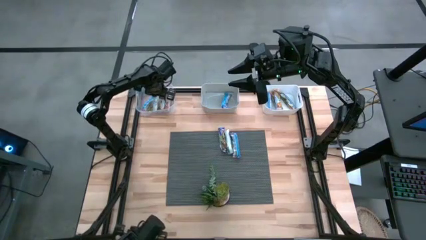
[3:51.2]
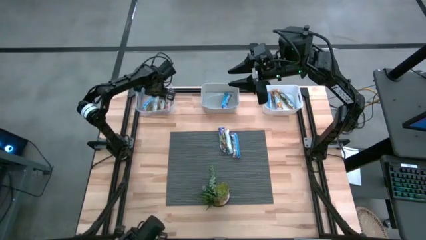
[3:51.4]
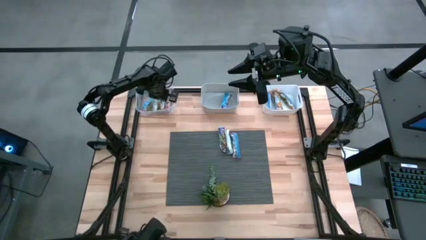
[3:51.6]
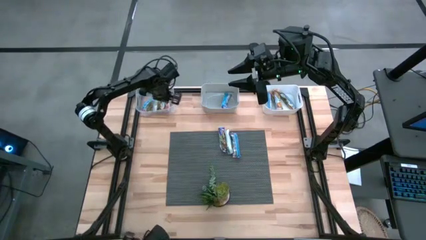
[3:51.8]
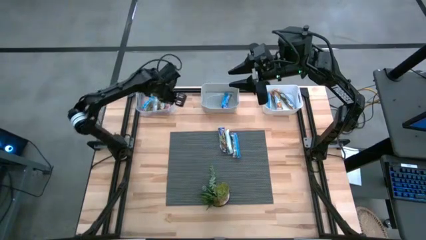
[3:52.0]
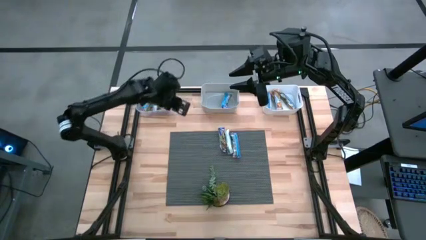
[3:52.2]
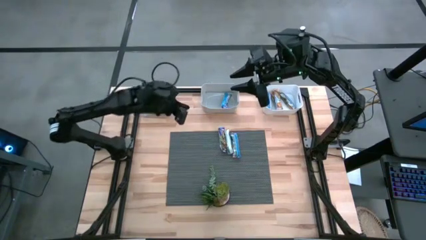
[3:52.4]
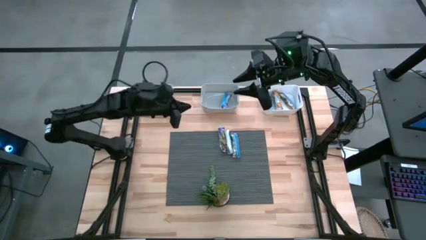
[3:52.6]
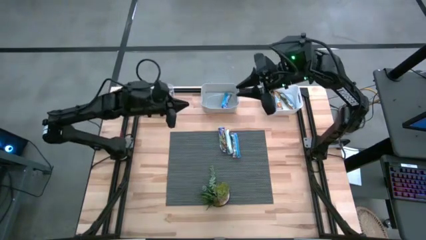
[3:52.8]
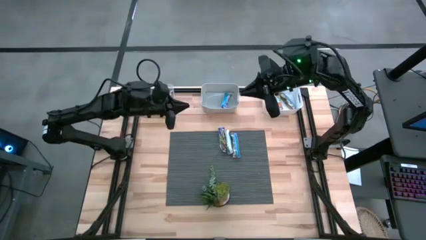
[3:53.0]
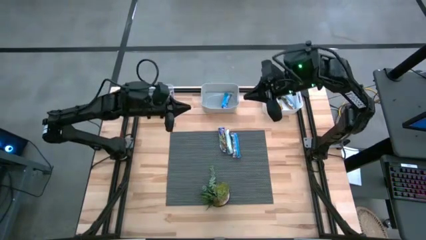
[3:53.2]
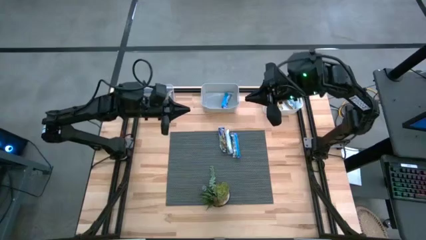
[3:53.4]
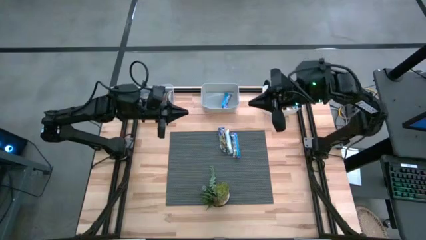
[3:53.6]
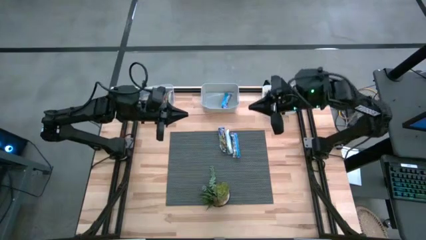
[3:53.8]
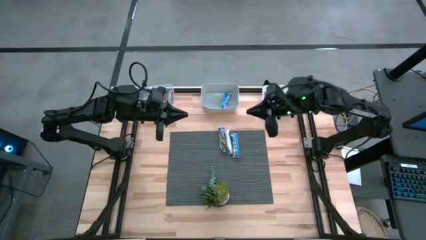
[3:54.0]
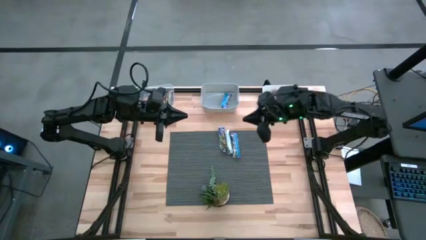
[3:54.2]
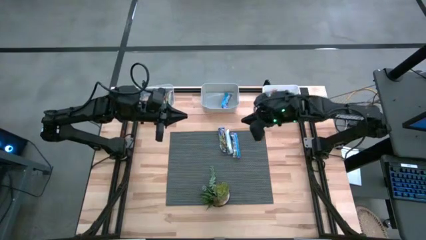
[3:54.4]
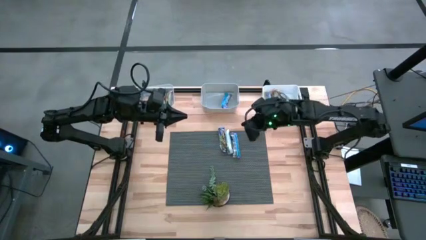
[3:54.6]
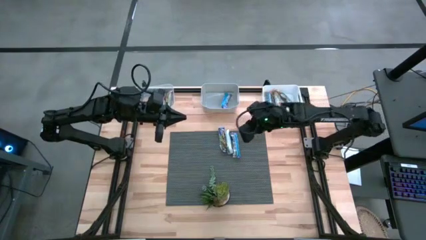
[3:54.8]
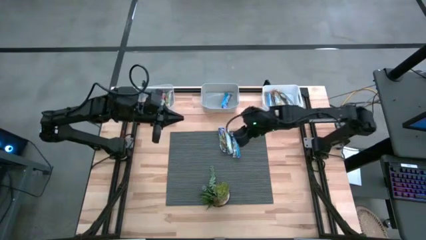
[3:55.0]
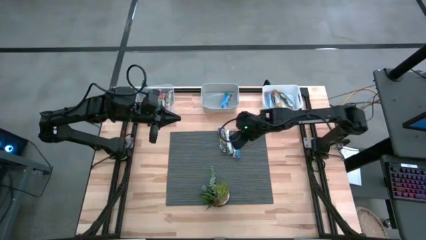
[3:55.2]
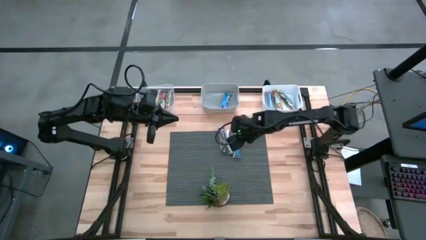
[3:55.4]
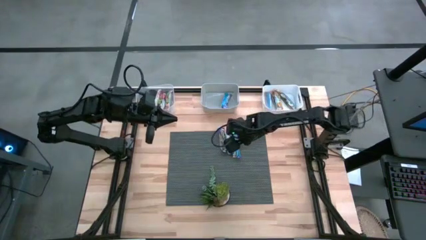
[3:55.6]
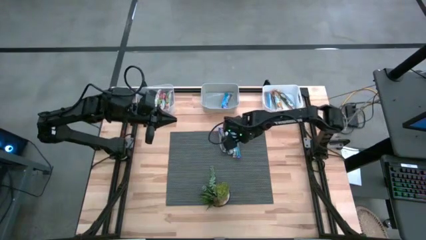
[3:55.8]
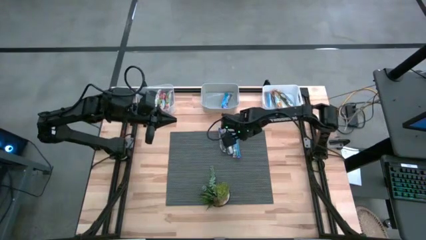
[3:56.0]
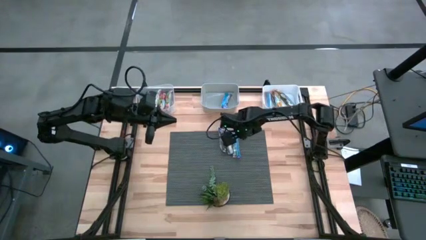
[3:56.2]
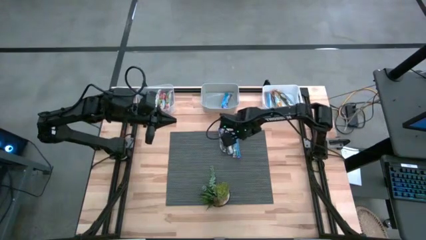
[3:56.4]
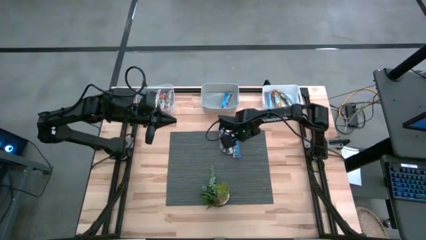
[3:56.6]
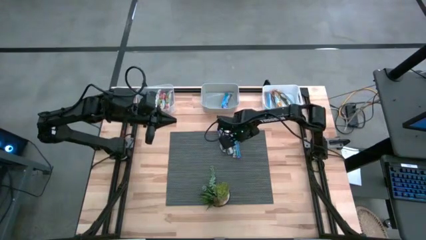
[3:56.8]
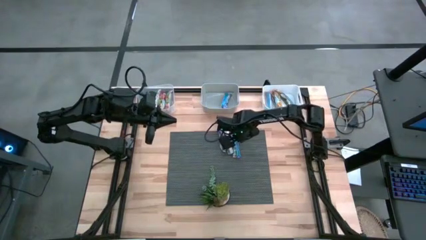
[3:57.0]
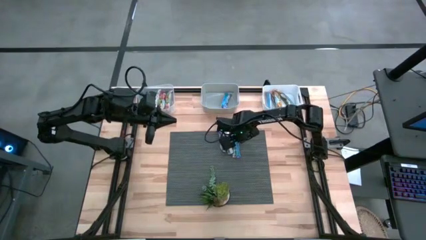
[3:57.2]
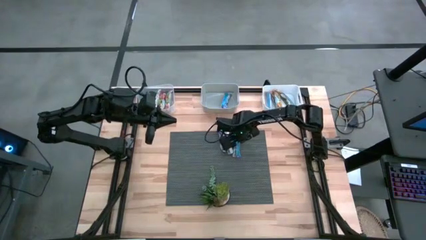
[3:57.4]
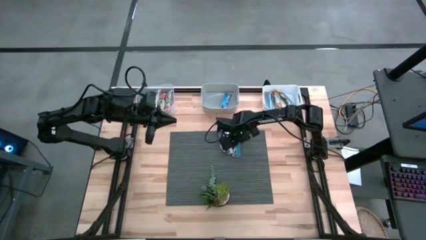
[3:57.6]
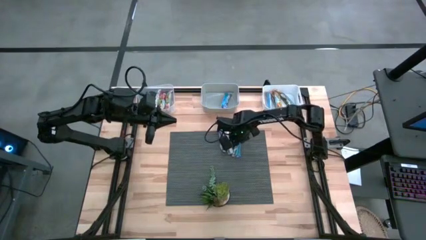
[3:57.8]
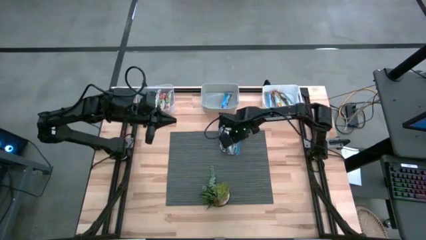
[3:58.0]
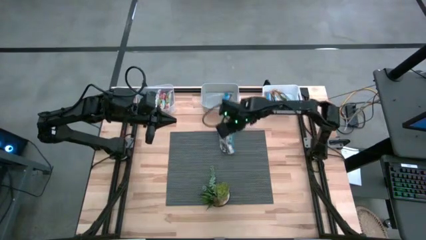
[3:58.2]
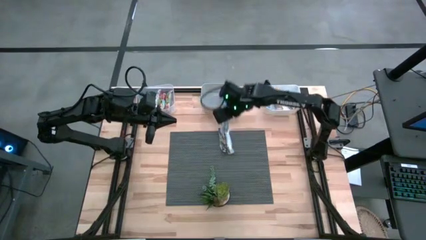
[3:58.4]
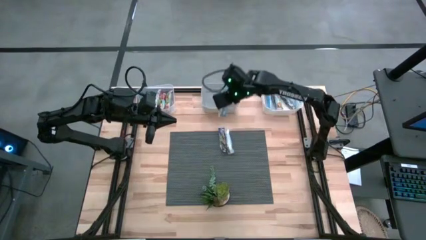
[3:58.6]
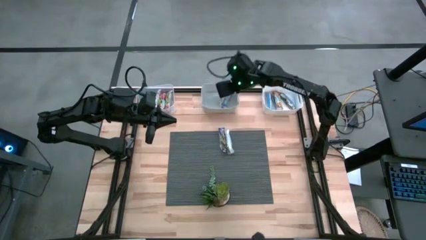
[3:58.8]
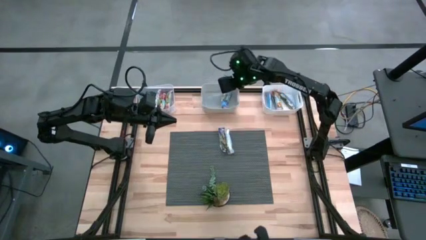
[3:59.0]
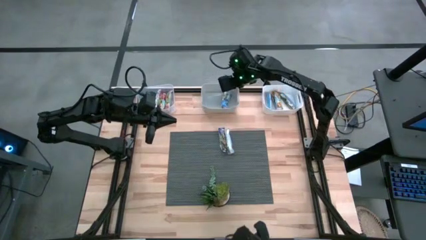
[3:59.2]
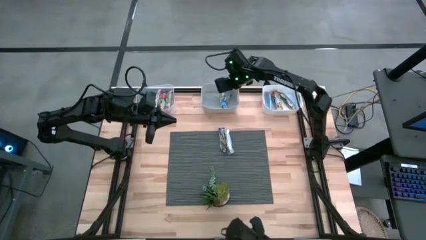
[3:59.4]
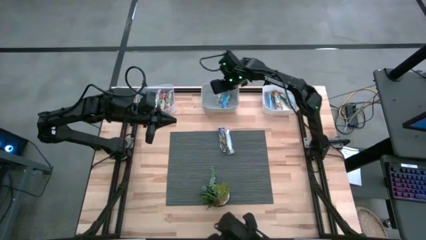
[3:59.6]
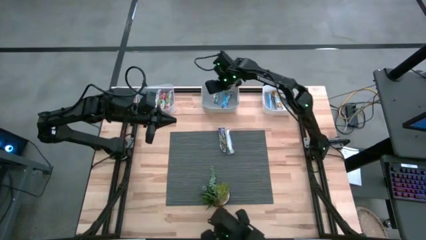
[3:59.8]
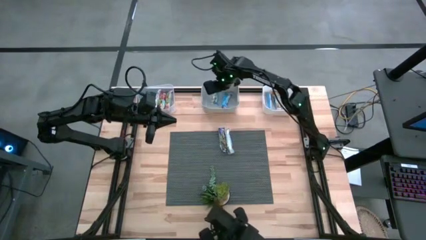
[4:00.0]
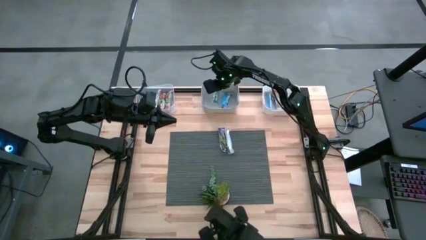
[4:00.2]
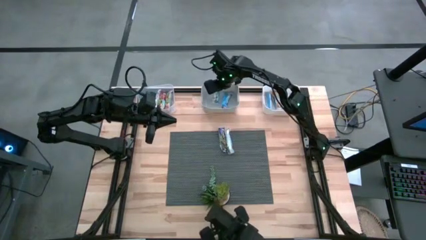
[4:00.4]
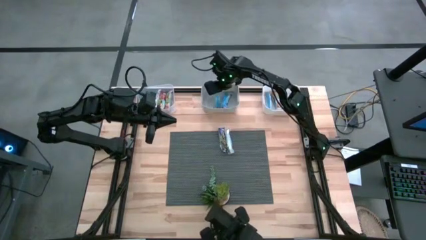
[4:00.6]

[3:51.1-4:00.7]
Task: Pick and place Granola Bars by type
Put the blue granola bar into the gray bin

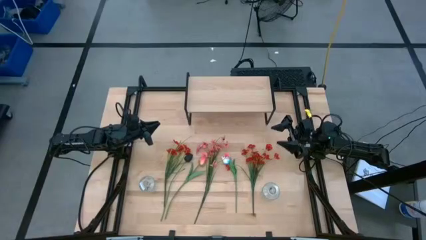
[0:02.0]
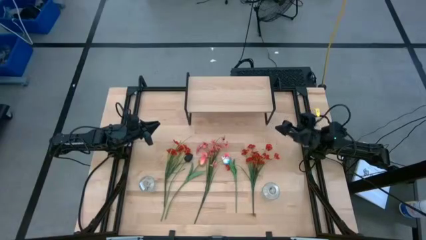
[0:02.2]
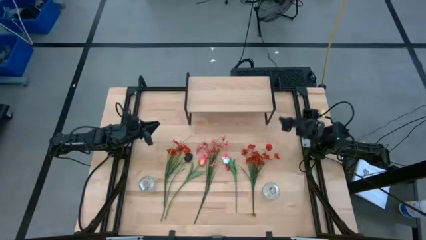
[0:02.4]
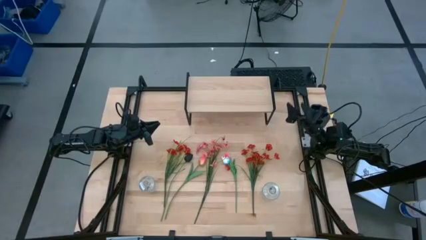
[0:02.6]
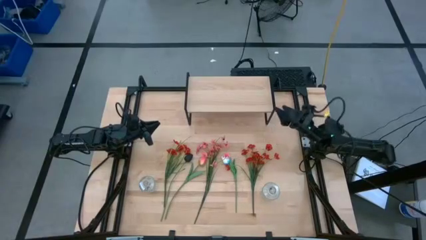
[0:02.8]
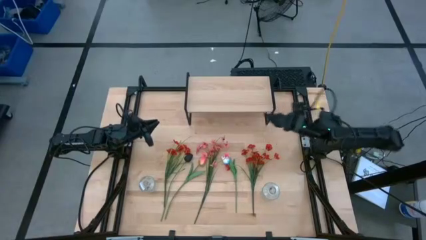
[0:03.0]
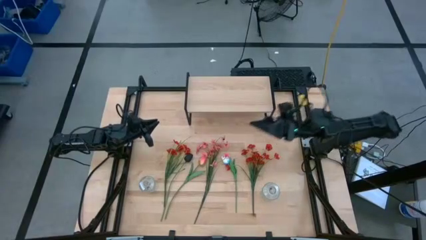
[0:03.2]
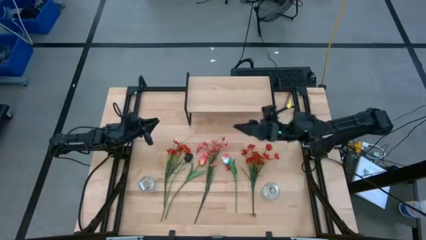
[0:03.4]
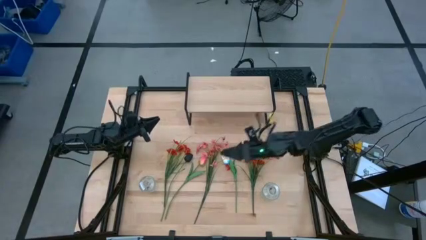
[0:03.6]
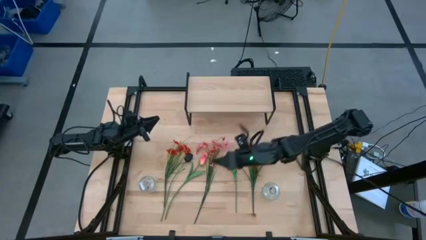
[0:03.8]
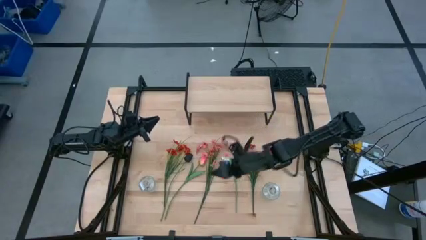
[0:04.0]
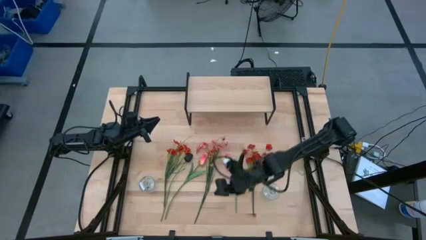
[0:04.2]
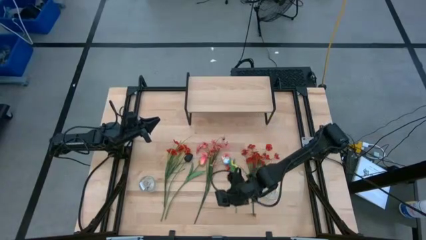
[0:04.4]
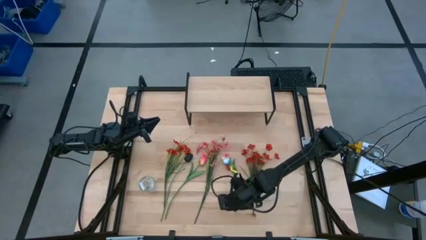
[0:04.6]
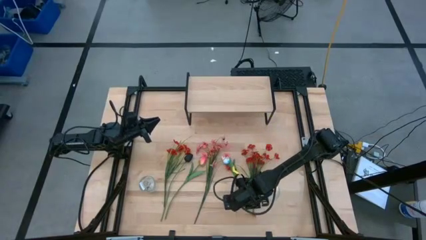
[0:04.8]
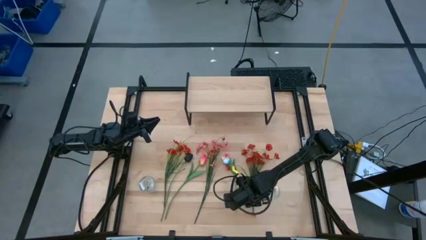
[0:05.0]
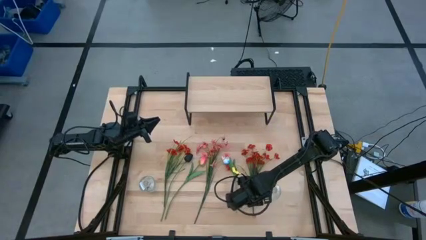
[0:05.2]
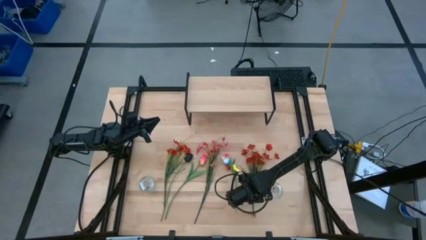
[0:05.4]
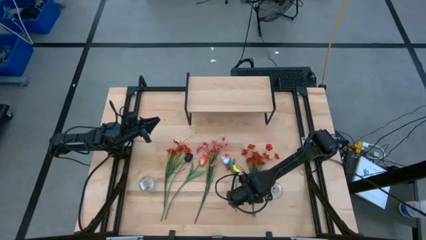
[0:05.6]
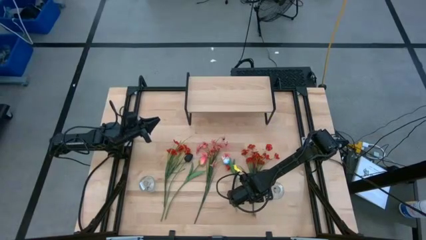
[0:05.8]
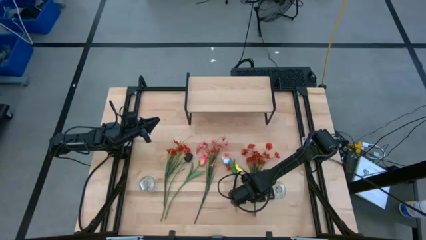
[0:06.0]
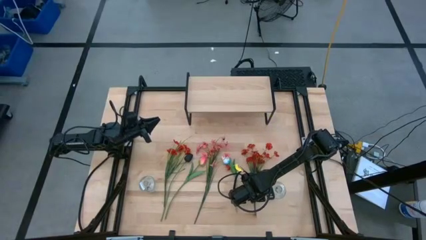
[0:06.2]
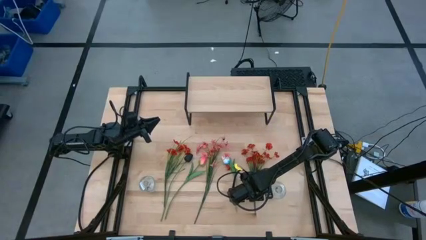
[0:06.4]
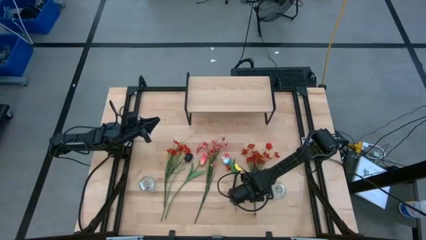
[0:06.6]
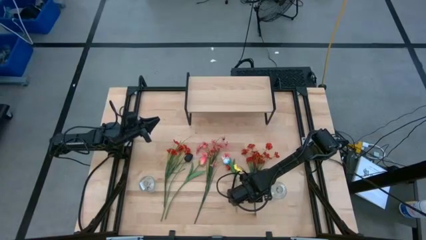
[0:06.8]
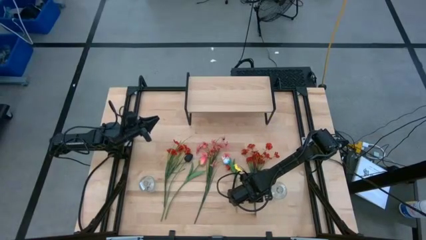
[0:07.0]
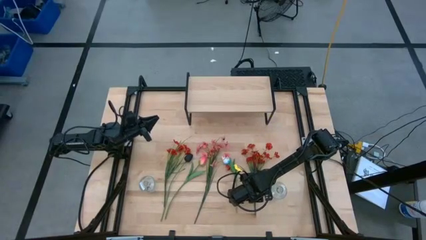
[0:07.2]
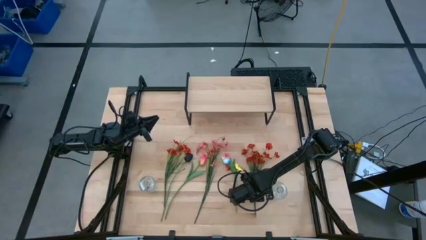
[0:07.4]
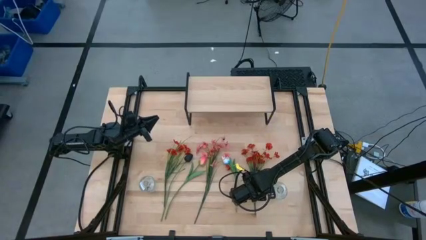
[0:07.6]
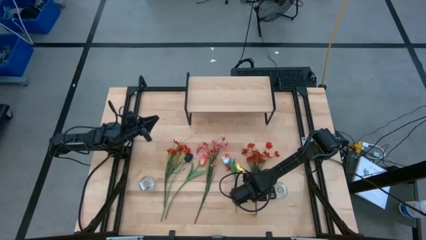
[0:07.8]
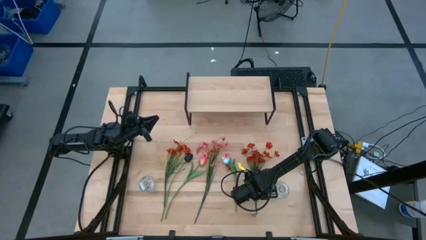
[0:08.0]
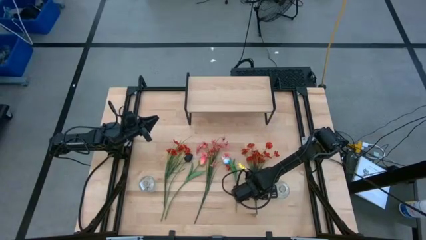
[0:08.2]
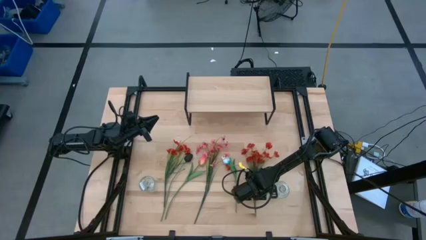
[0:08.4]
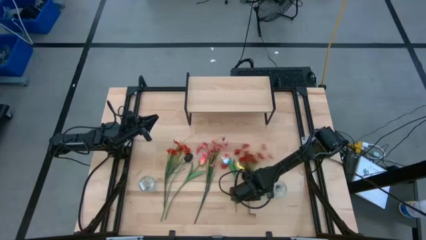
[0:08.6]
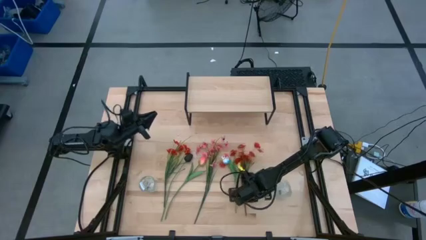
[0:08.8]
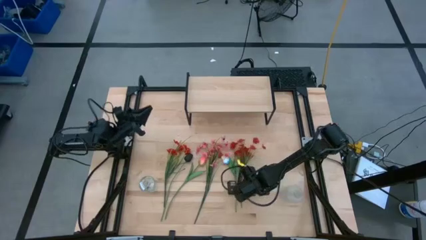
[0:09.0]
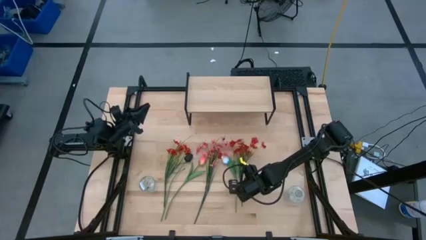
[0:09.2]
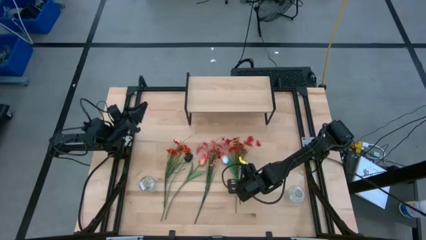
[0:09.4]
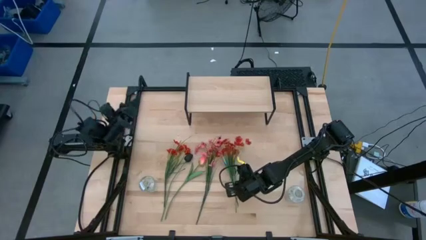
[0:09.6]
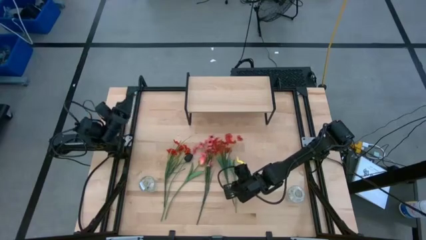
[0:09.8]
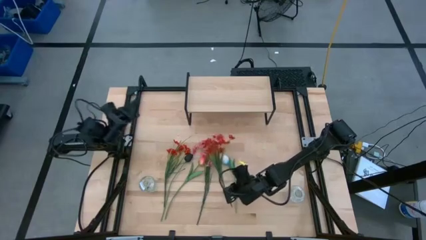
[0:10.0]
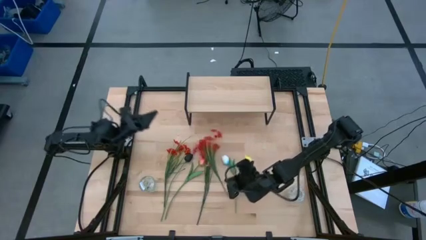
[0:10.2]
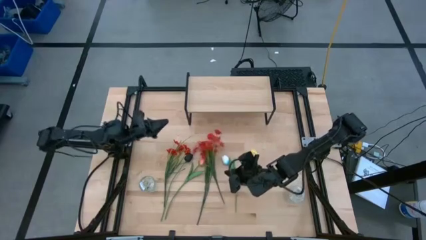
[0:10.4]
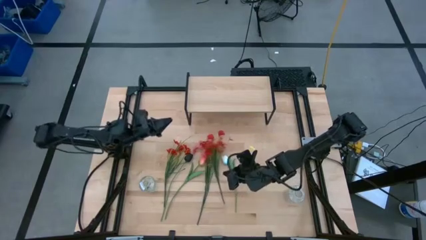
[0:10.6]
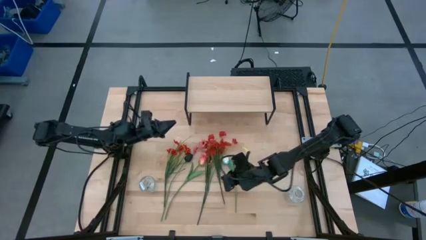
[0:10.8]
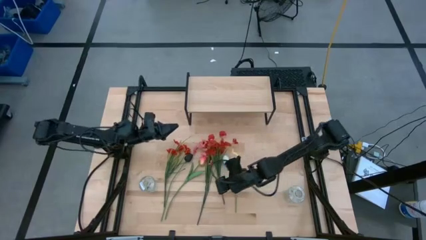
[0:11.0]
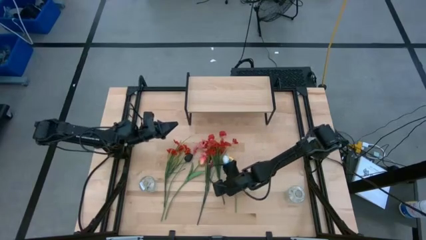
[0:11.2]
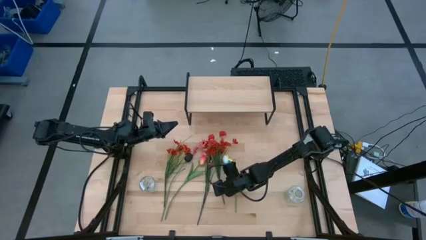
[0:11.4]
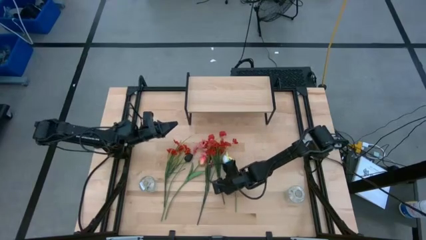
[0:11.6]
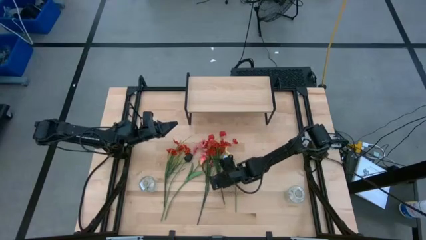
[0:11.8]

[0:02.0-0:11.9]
Task: Pick and place flowers into a vace then onto a shelf
Put the right orange flowers into the right transparent vase
